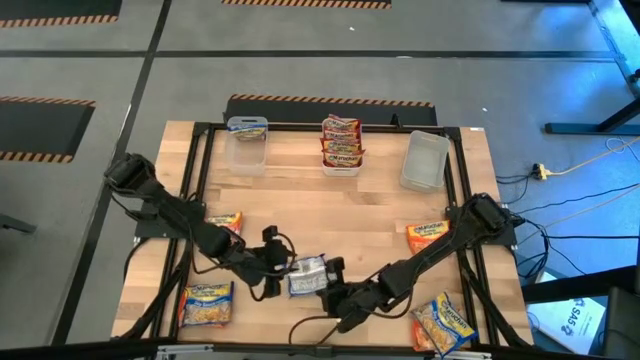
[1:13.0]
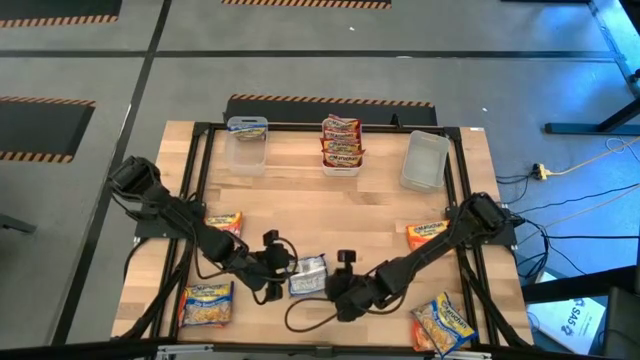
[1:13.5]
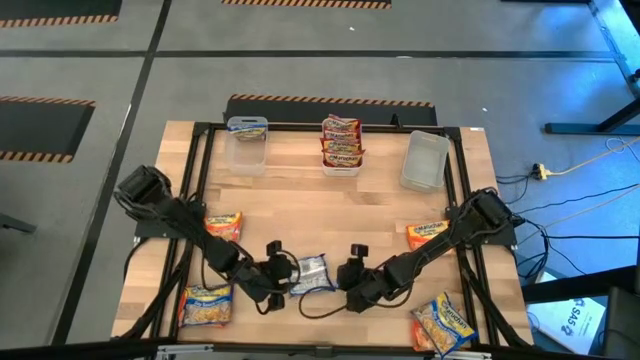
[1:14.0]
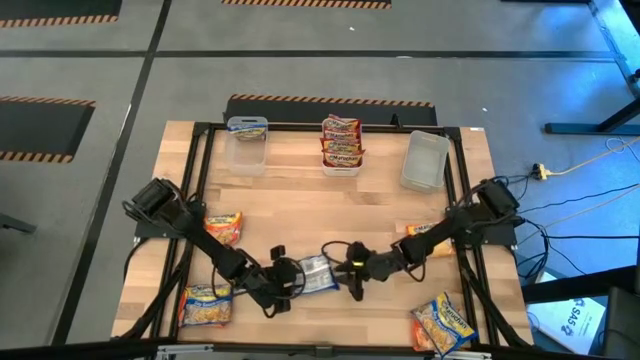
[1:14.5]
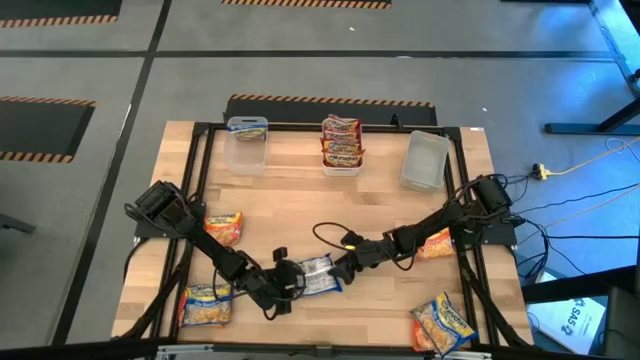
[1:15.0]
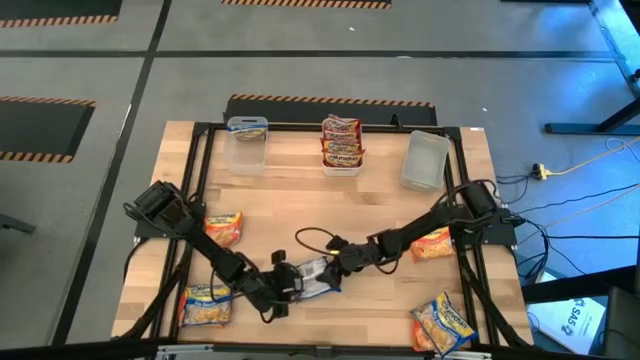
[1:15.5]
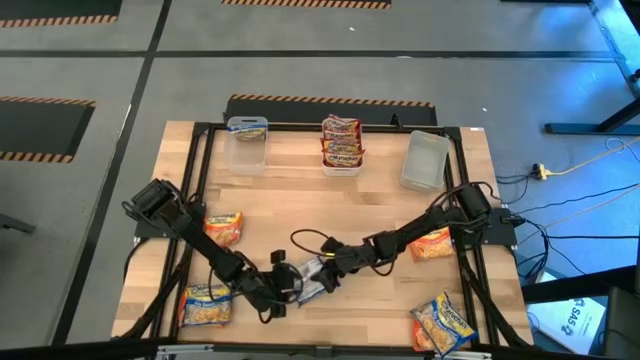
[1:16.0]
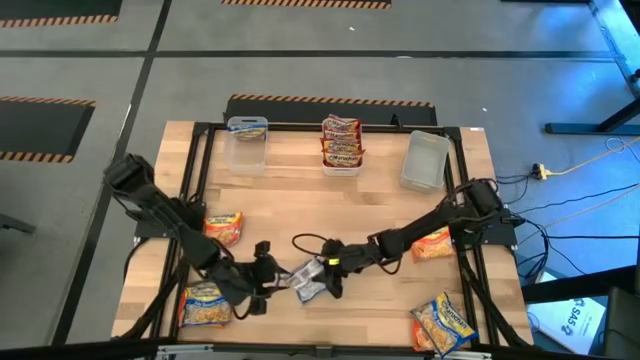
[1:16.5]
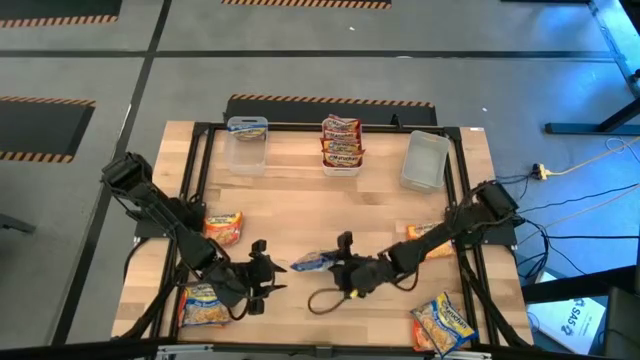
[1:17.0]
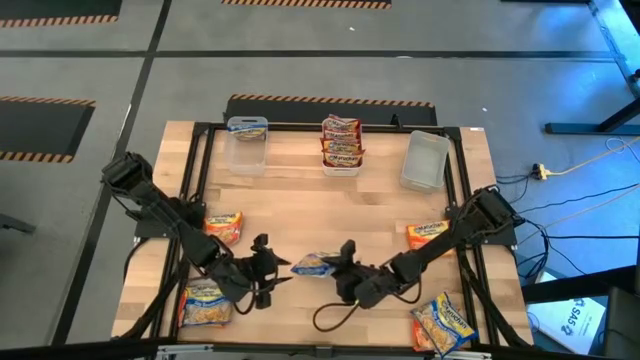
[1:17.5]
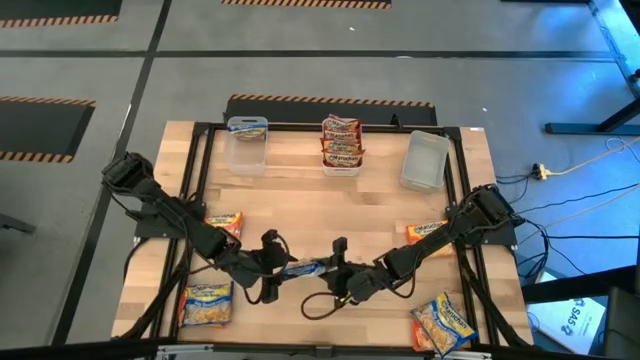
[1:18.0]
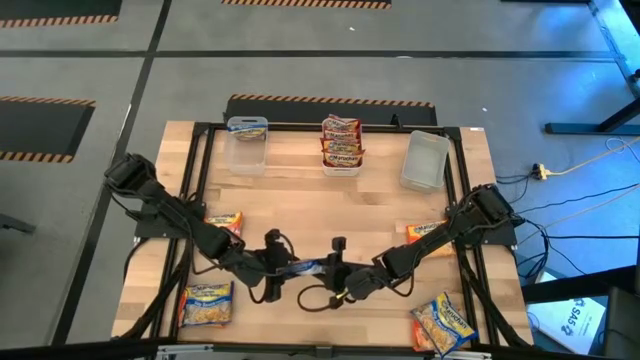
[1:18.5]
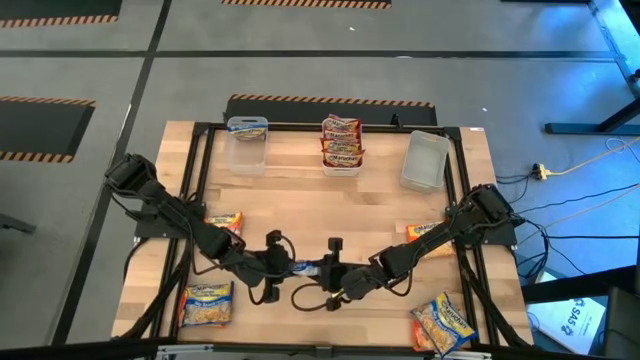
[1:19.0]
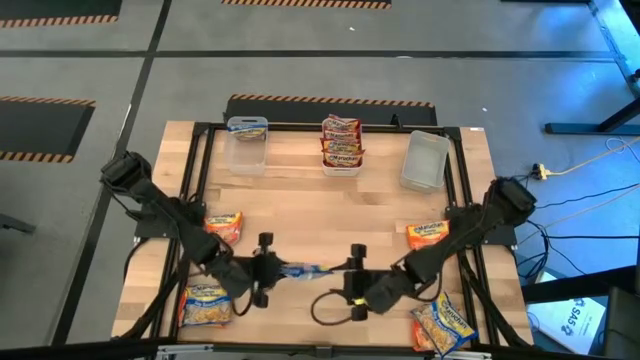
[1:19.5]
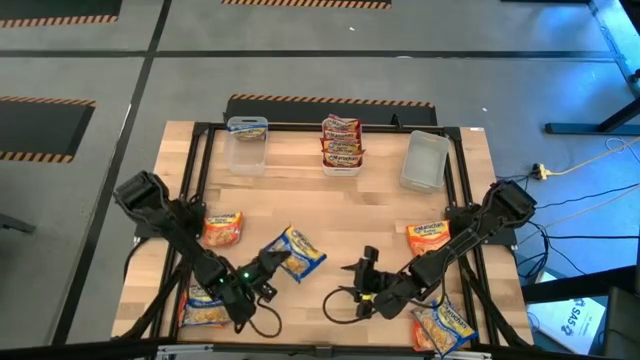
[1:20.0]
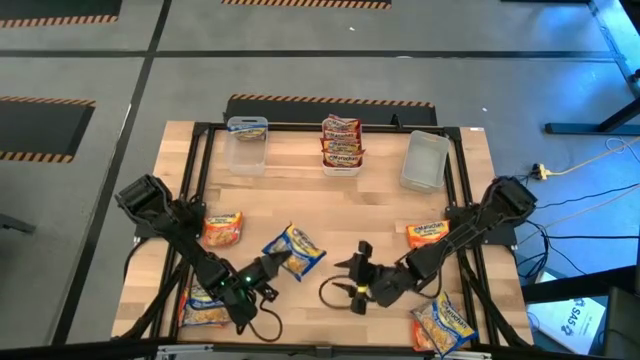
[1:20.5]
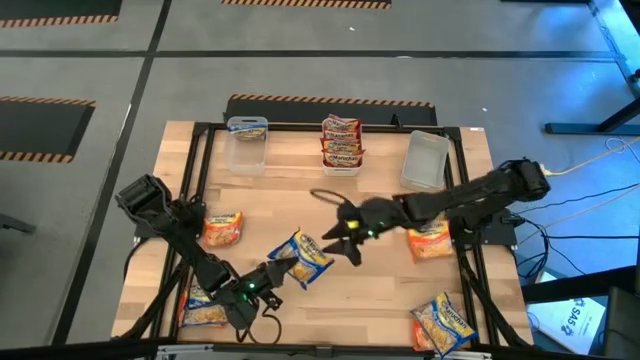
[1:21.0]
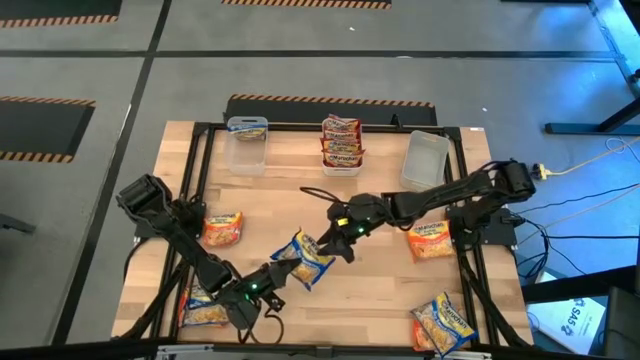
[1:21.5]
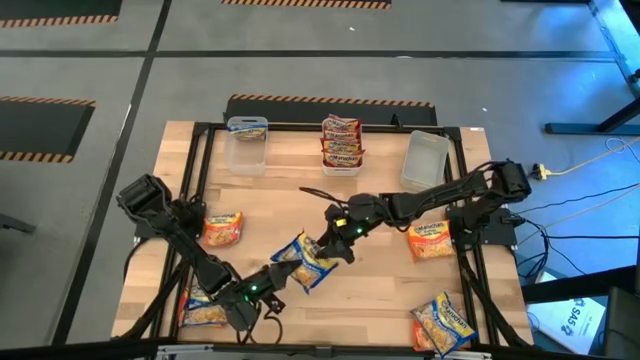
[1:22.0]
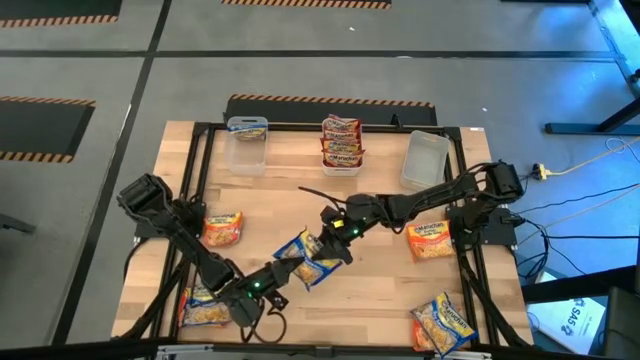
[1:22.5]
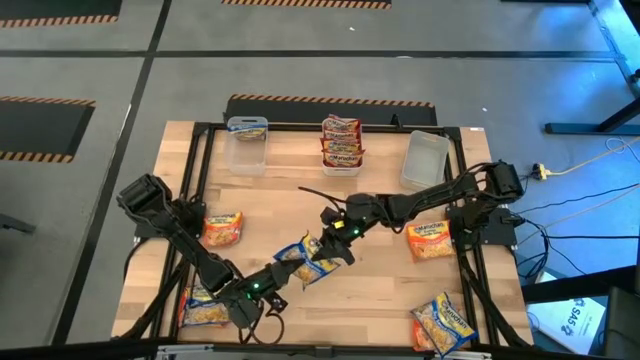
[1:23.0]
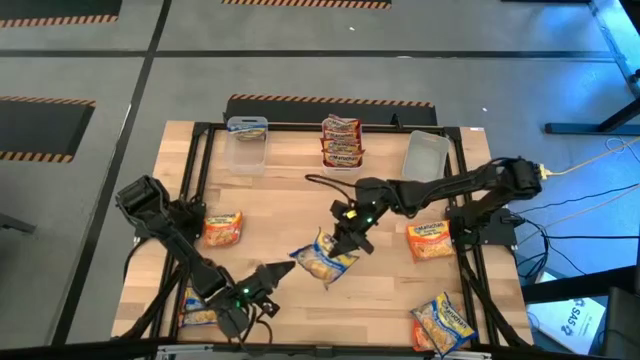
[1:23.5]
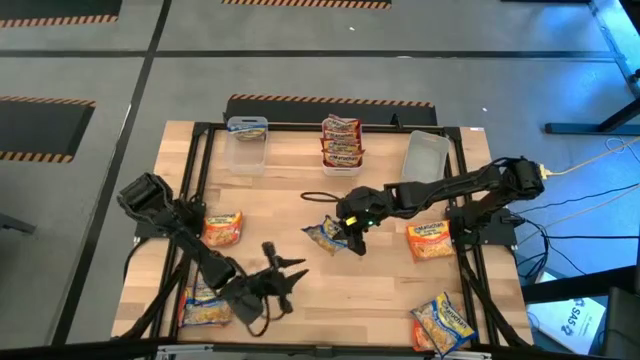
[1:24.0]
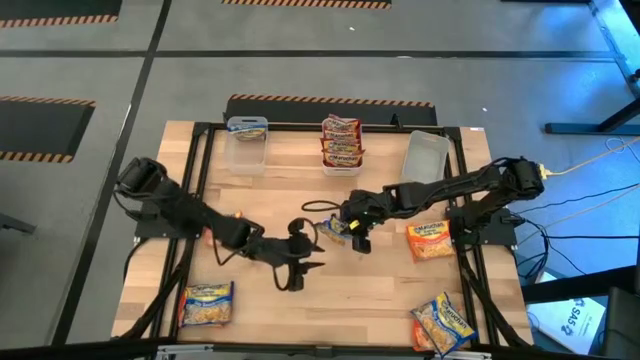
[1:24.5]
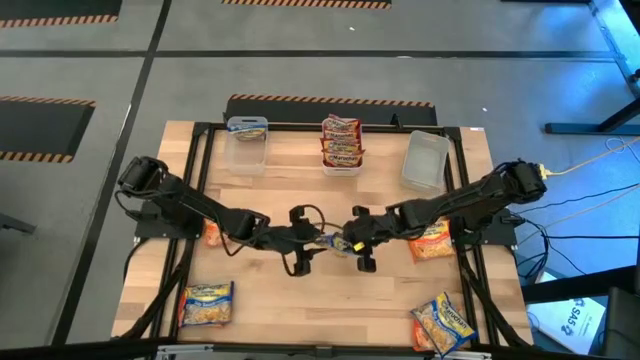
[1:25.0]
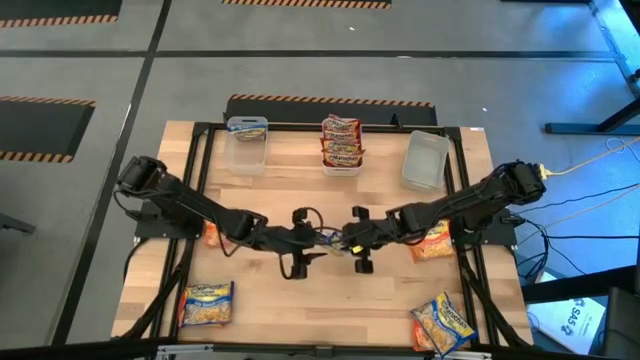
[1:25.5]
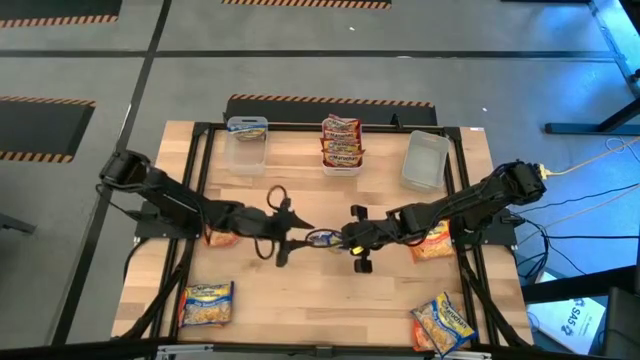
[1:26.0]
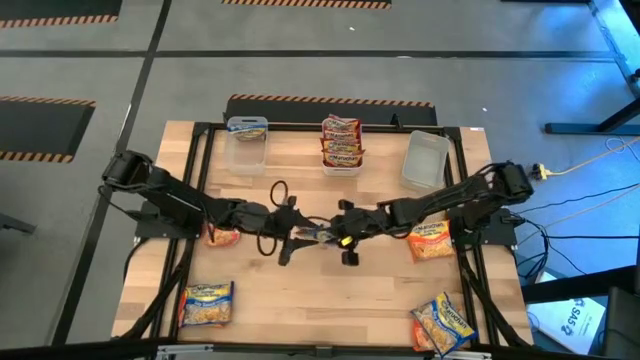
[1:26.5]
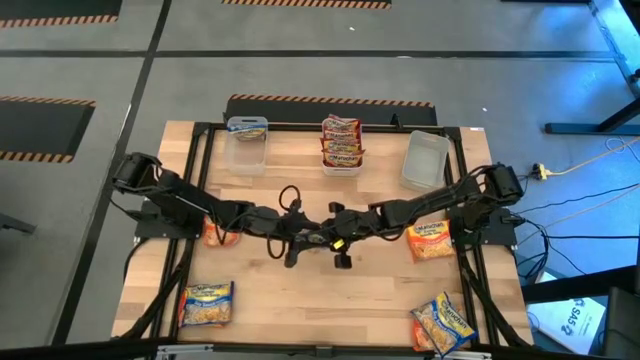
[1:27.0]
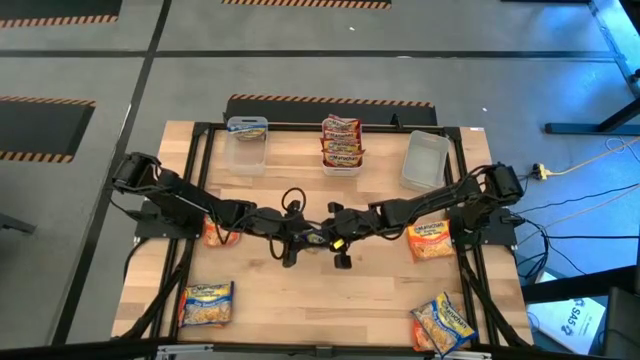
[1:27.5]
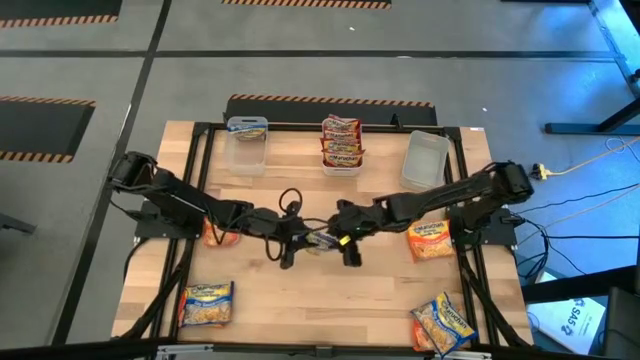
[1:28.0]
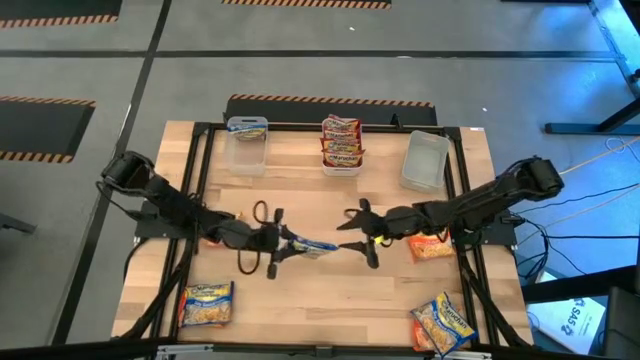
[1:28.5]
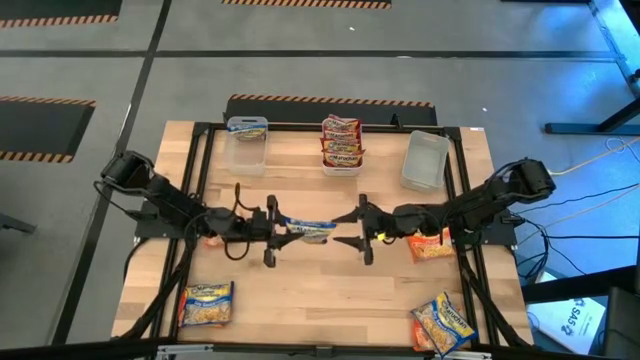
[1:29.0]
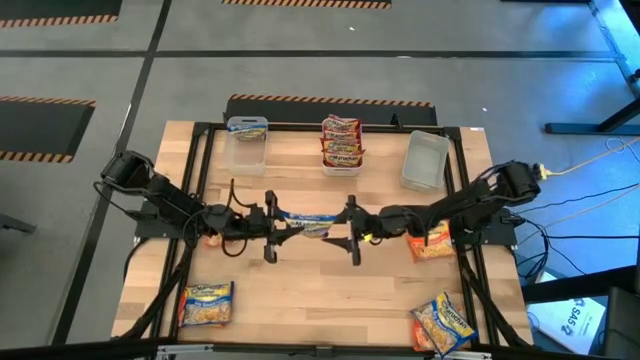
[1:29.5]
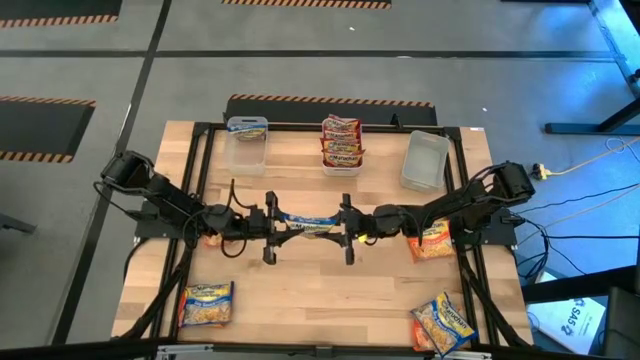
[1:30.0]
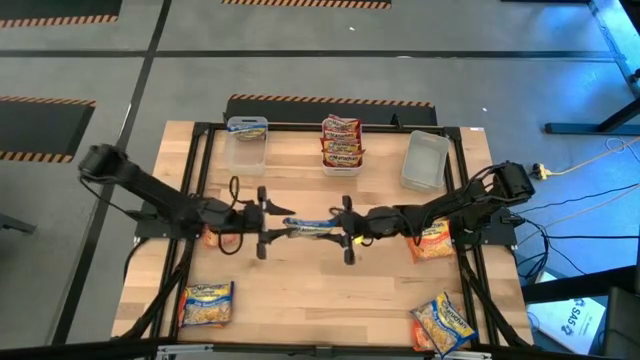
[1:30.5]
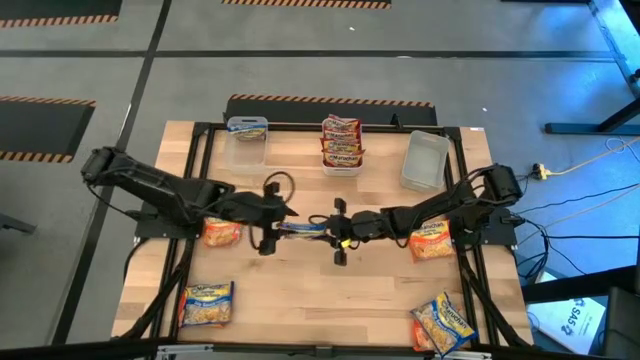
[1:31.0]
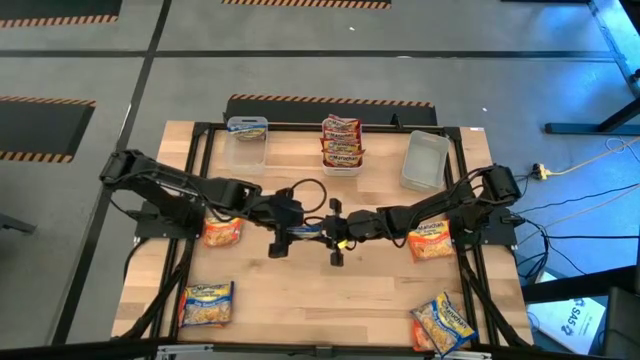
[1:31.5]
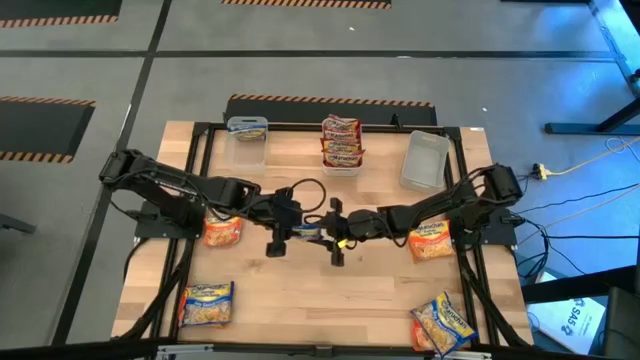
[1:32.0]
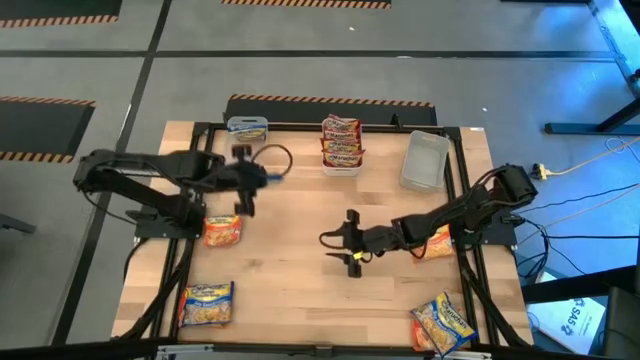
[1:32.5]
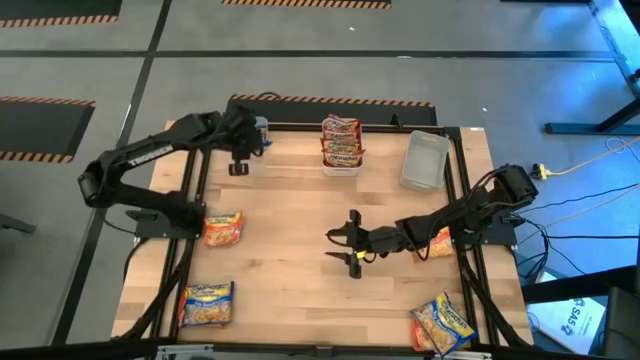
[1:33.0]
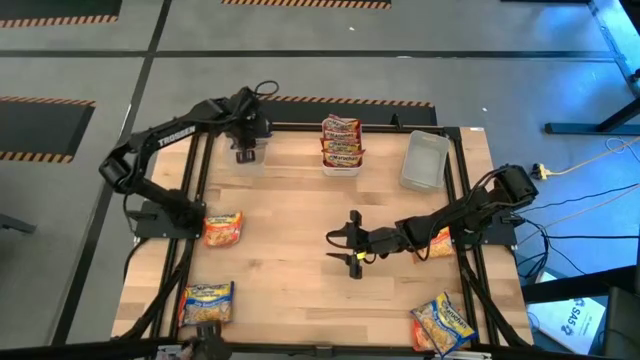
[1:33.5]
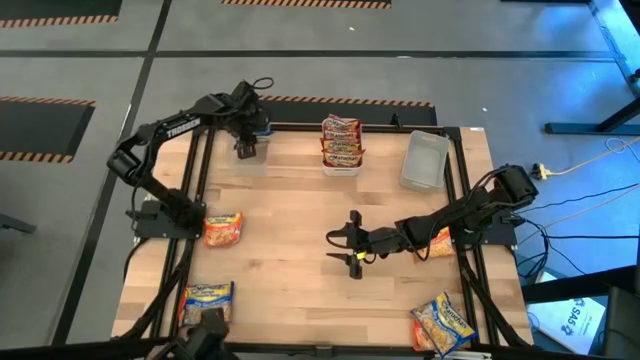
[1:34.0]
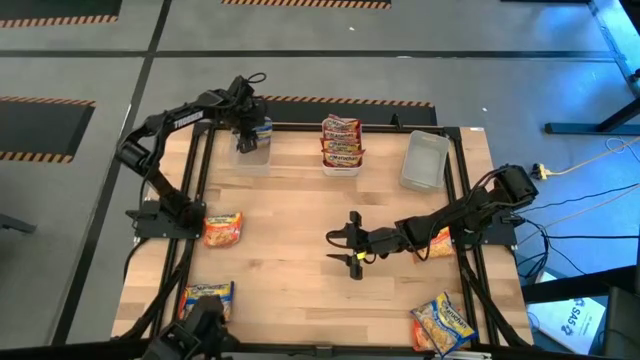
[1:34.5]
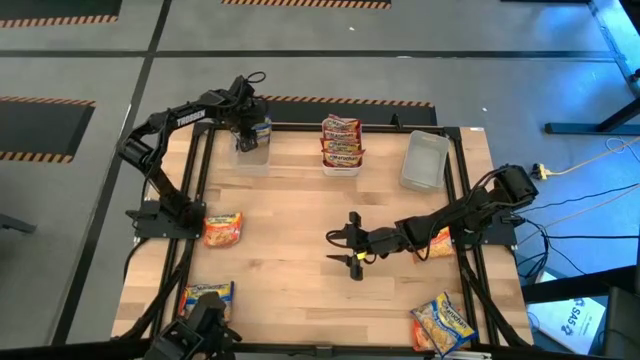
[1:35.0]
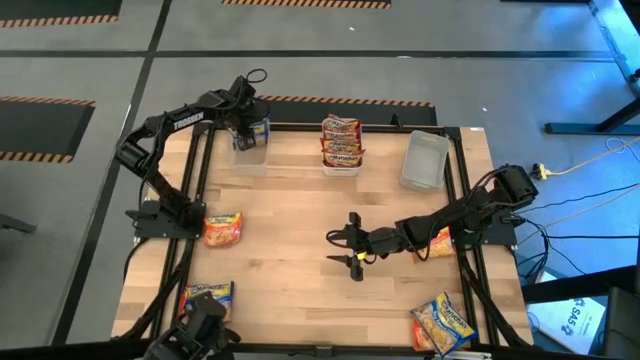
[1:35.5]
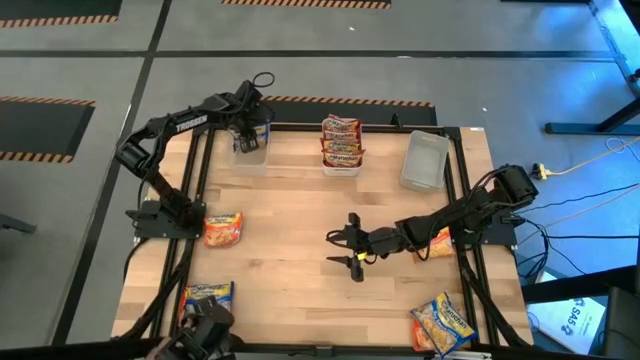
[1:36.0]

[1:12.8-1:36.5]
Task: Sort Maruchan noodles
Put the blue noodle pack into the transparent bin
